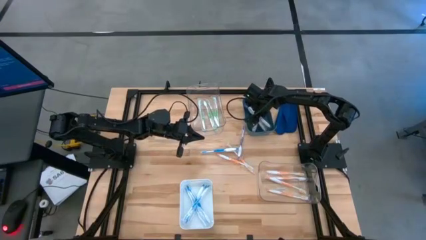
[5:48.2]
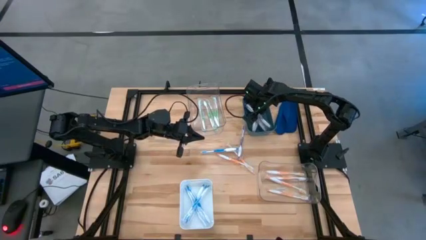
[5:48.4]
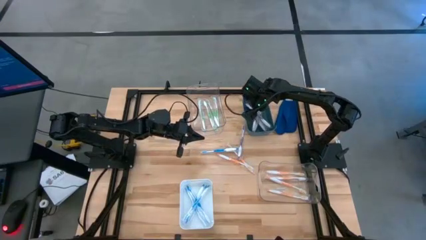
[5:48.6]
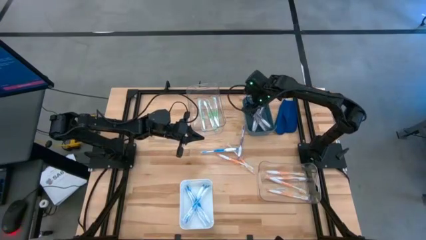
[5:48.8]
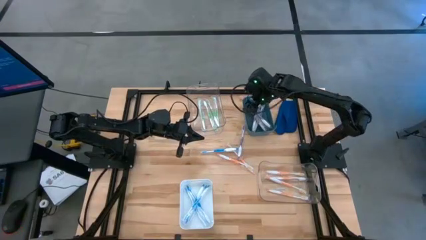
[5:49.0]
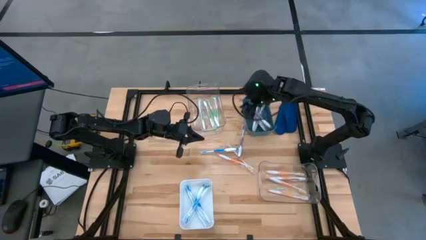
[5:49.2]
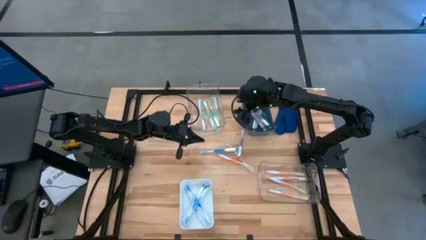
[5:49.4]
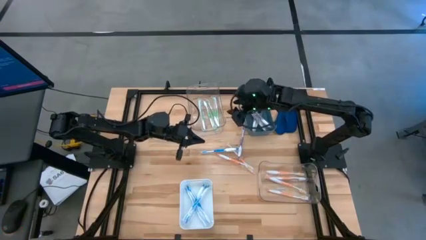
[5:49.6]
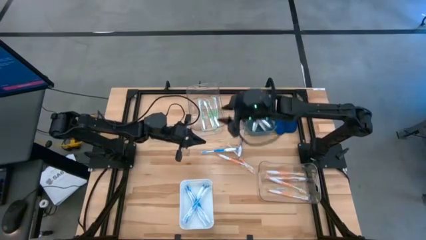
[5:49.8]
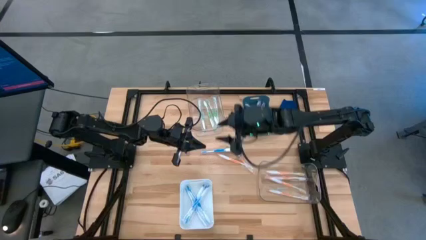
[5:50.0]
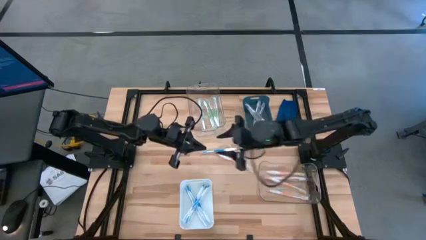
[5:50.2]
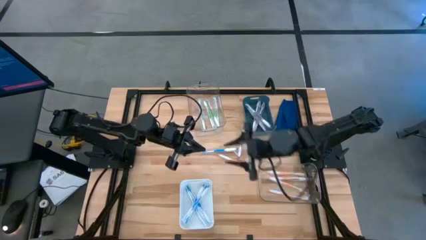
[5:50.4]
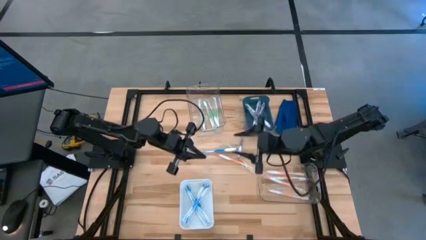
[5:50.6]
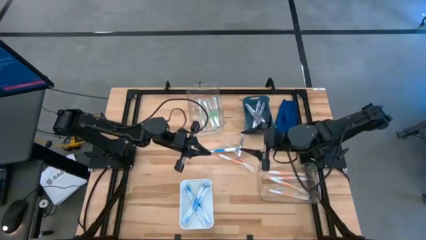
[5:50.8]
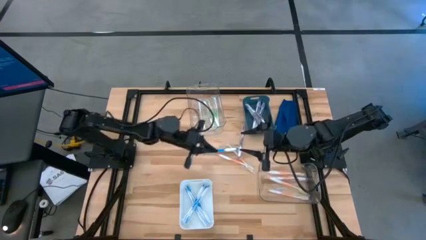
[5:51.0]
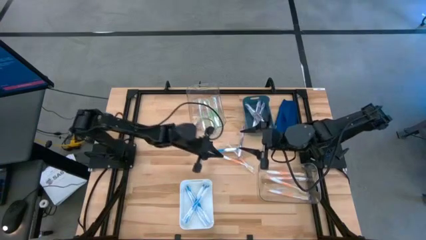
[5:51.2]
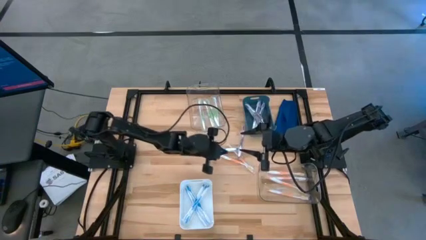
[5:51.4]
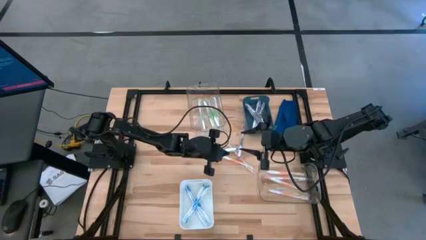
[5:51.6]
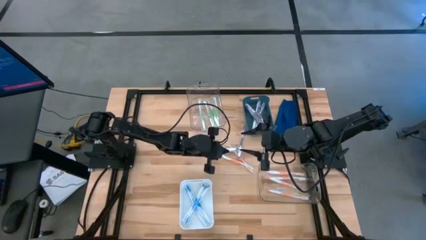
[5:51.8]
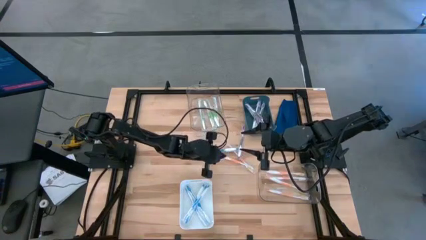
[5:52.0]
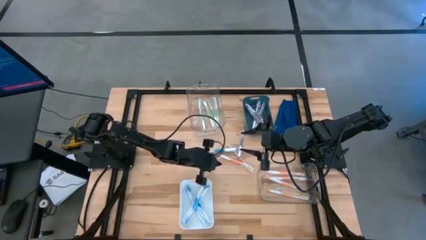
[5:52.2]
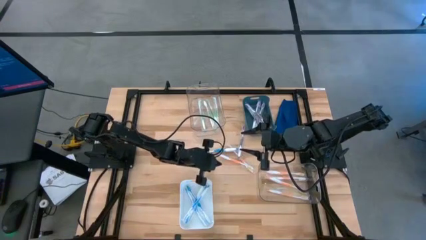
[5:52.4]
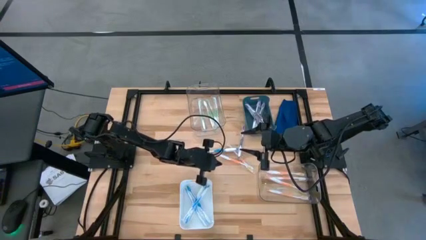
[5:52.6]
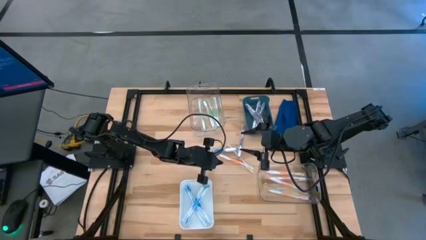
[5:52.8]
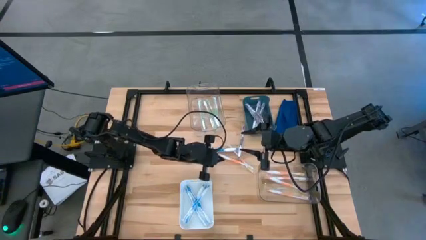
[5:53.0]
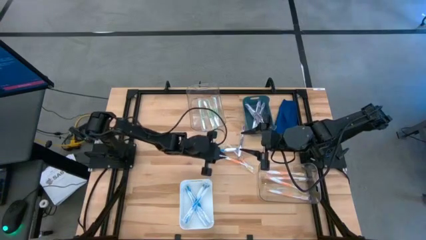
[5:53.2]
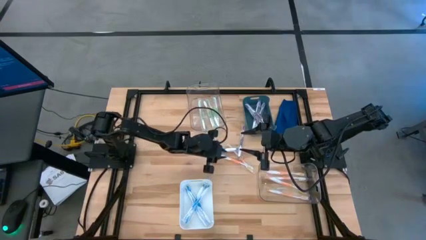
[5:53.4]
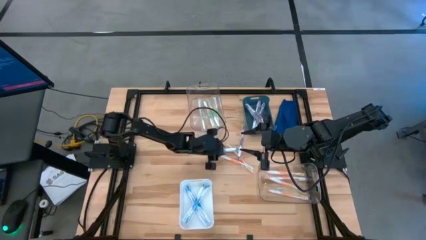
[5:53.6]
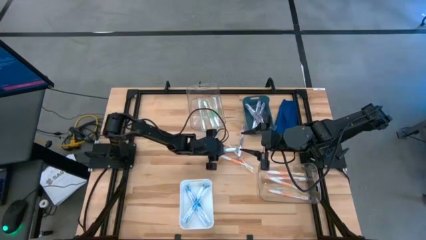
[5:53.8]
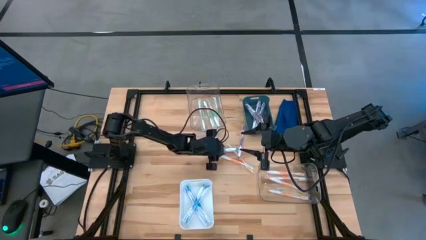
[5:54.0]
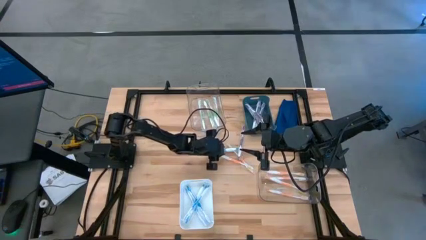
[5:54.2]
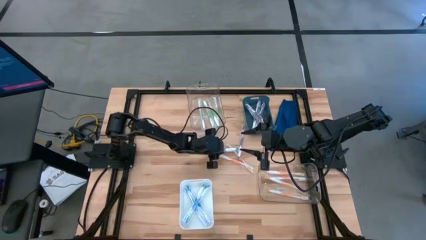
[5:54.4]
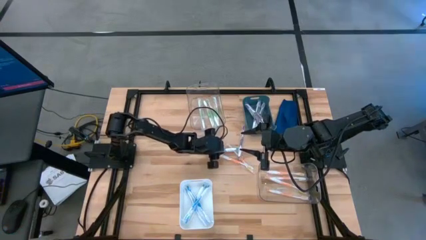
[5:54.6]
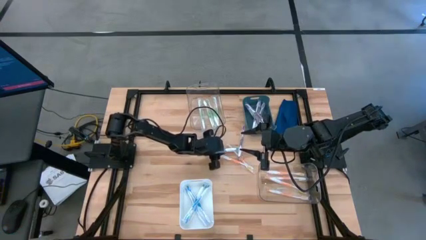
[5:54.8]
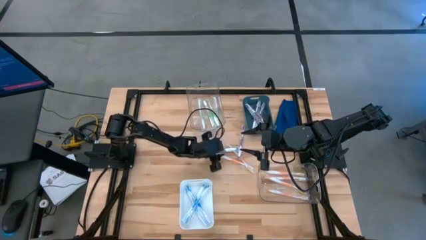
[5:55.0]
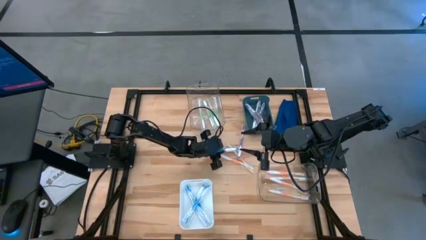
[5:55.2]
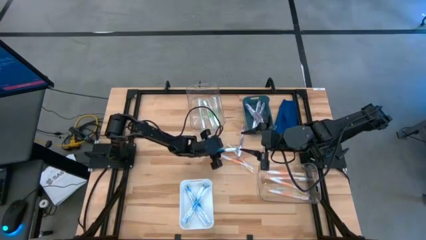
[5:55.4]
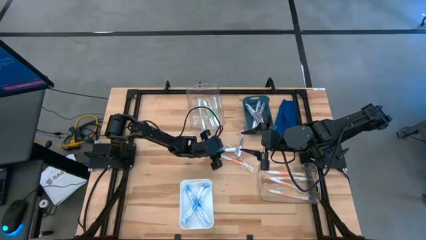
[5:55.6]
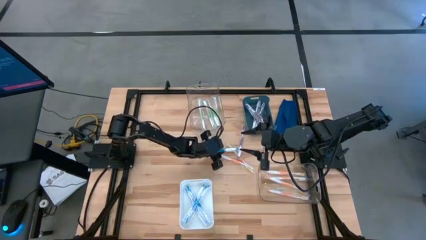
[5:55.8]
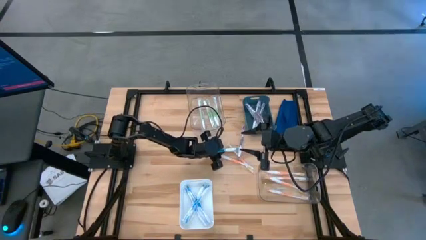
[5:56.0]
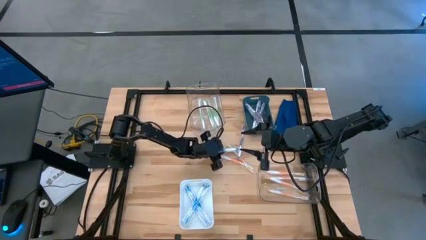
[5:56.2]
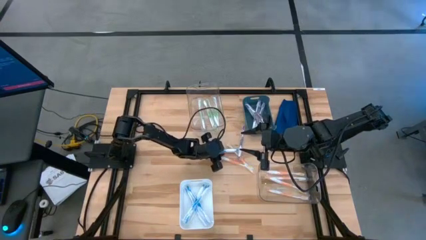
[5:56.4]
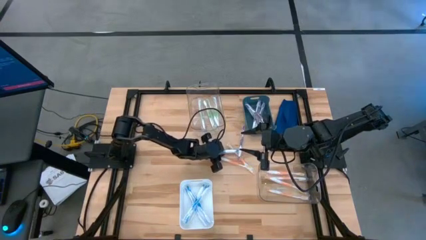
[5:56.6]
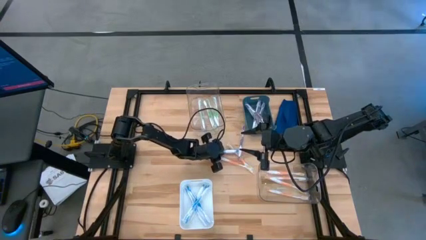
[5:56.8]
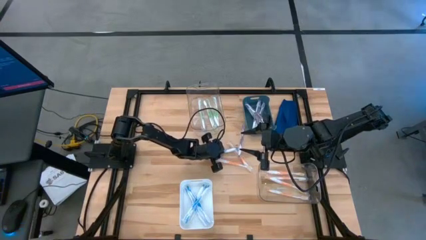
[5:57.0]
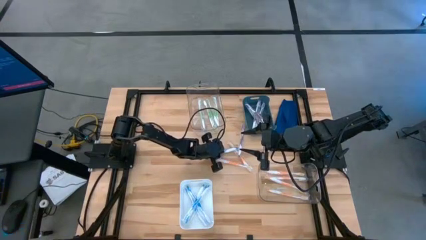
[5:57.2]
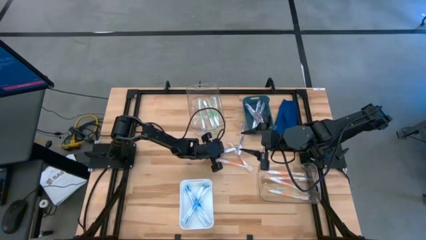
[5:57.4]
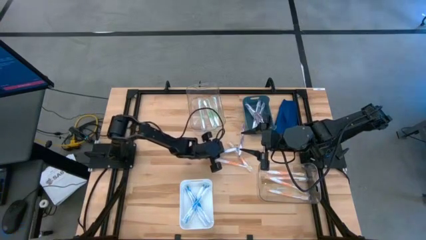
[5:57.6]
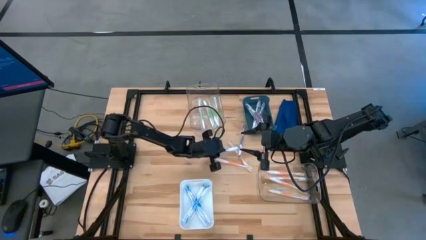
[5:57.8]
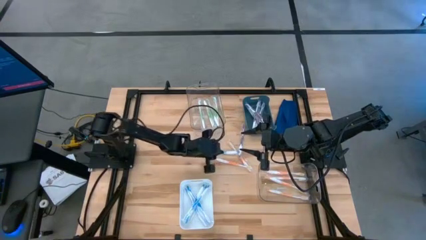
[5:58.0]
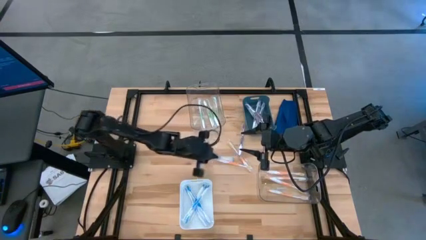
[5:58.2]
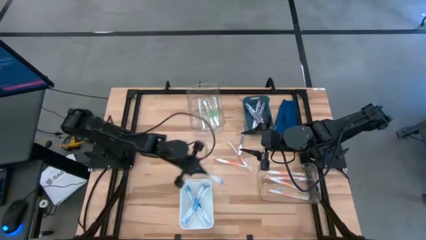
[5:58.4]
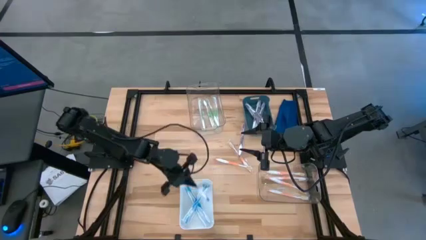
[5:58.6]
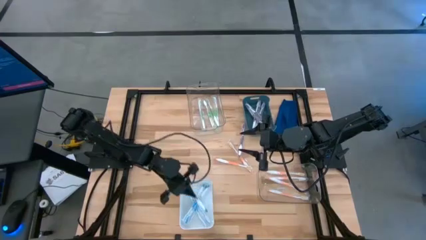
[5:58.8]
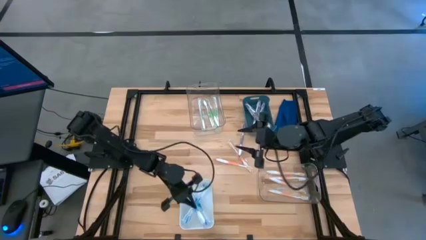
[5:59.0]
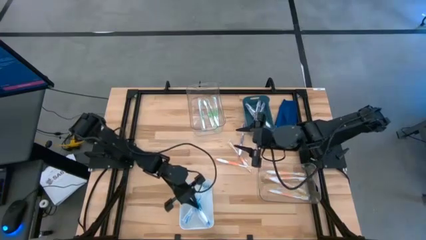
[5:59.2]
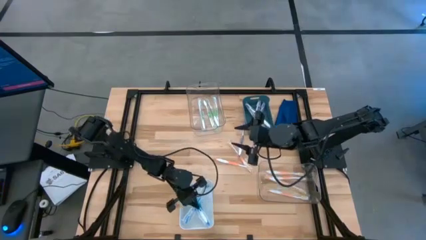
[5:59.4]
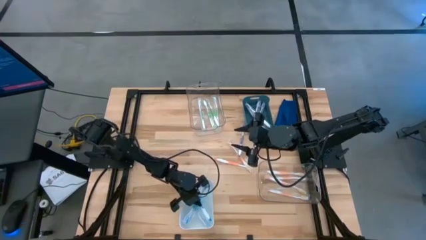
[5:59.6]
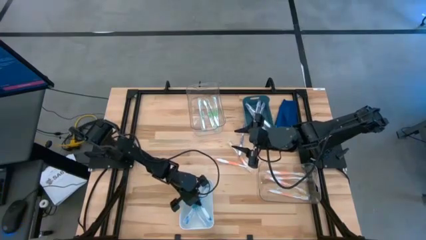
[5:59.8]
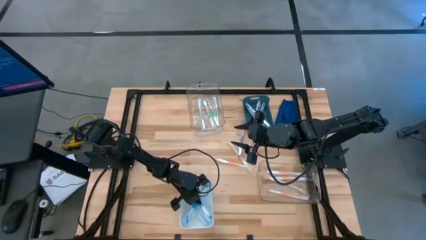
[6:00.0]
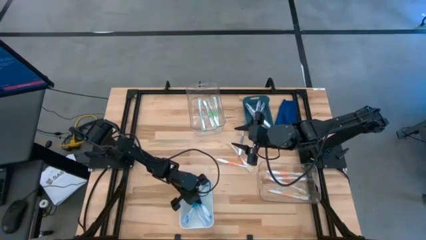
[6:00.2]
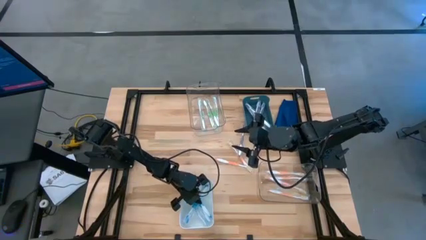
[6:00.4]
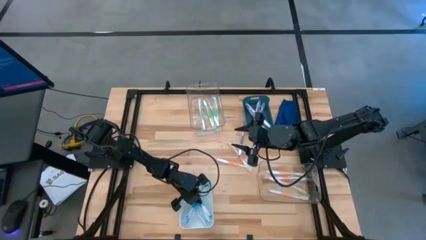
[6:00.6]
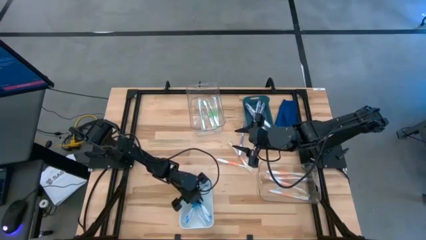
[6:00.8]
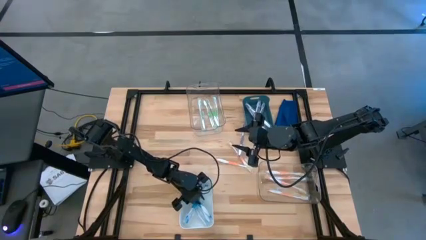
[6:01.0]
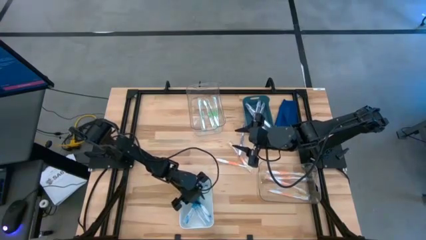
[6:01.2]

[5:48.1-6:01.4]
Task: Pick & Place Toothbrushes
Put the blue toothbrush into the white bin
